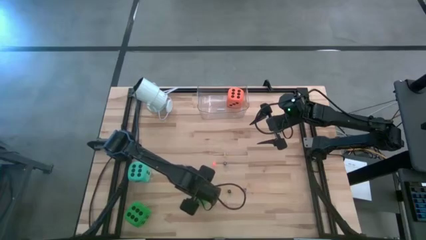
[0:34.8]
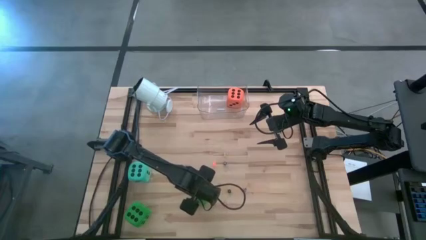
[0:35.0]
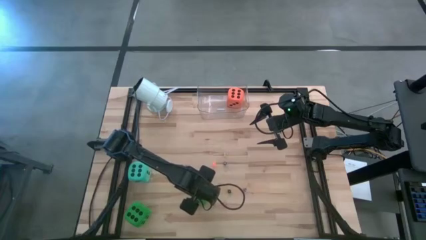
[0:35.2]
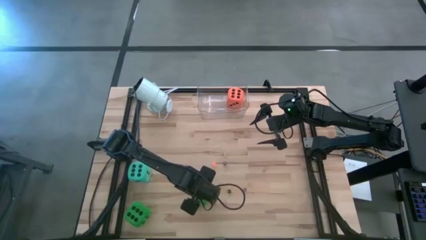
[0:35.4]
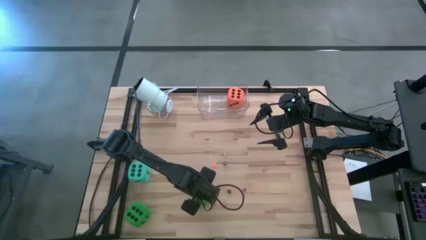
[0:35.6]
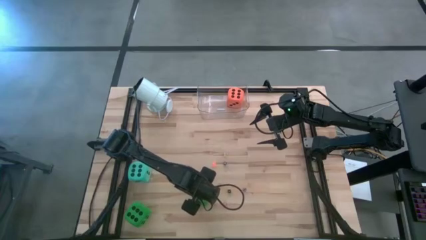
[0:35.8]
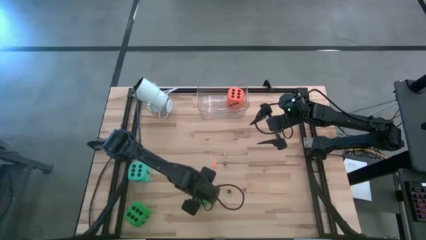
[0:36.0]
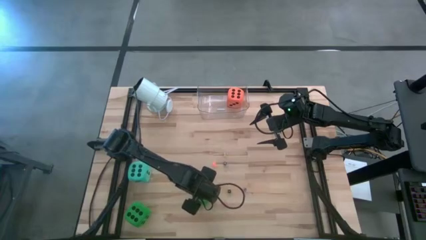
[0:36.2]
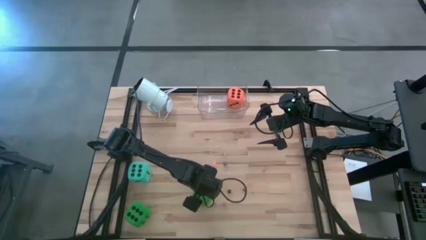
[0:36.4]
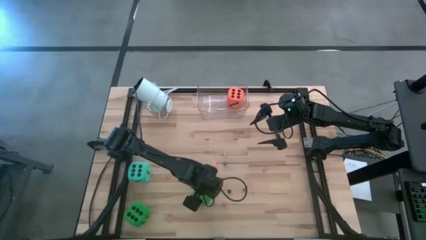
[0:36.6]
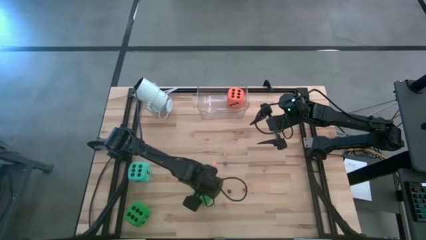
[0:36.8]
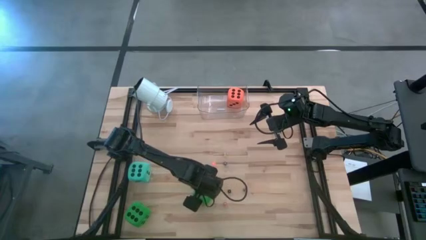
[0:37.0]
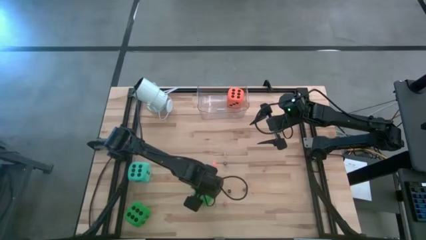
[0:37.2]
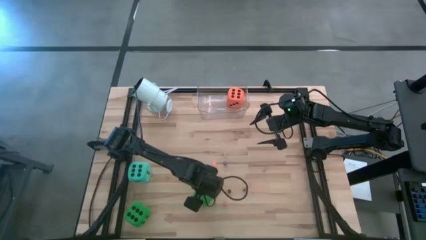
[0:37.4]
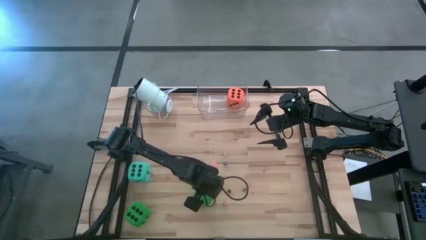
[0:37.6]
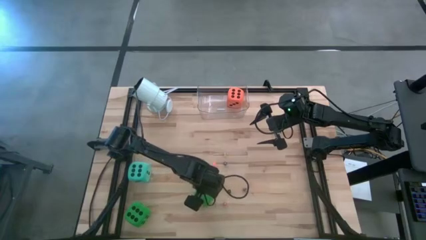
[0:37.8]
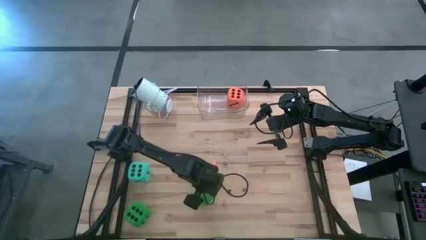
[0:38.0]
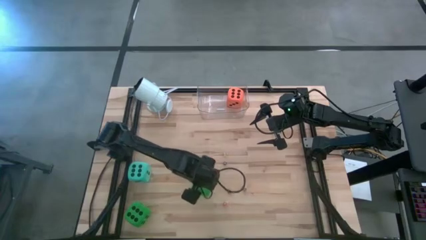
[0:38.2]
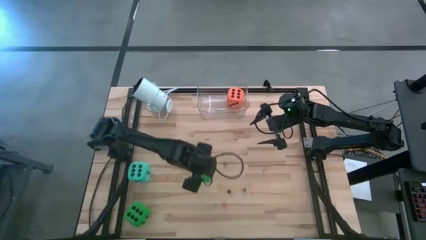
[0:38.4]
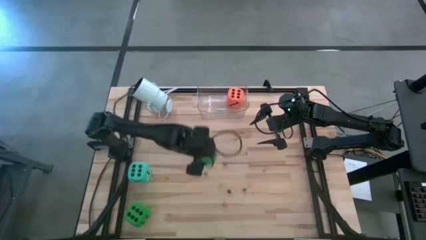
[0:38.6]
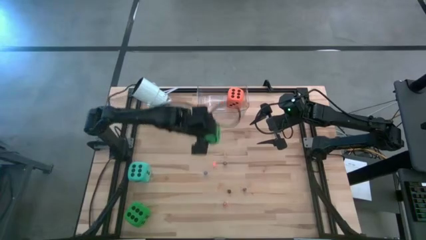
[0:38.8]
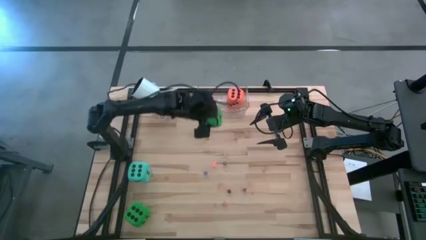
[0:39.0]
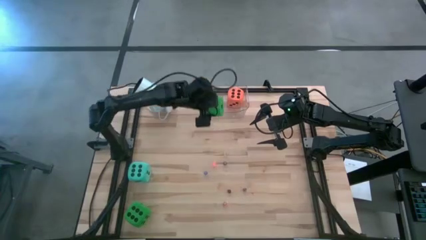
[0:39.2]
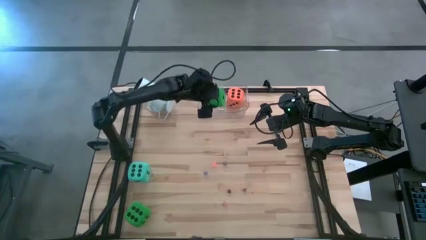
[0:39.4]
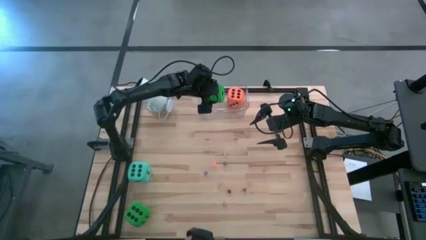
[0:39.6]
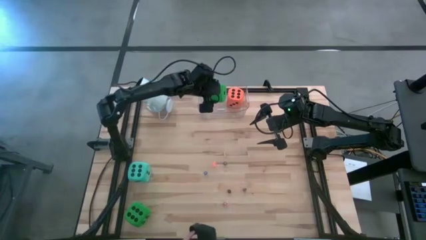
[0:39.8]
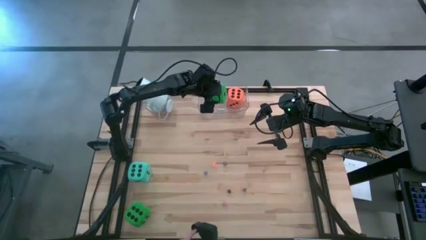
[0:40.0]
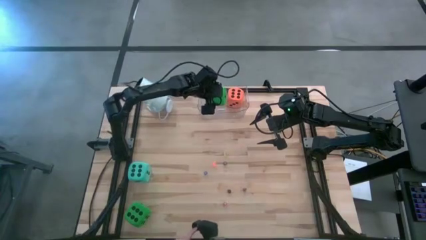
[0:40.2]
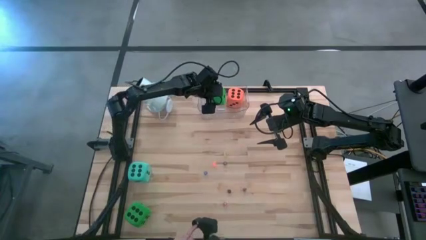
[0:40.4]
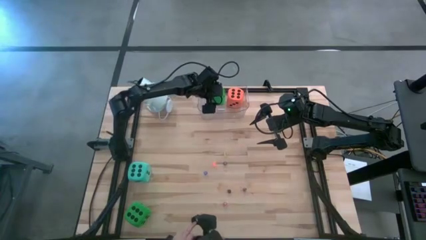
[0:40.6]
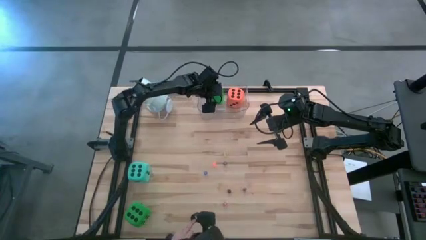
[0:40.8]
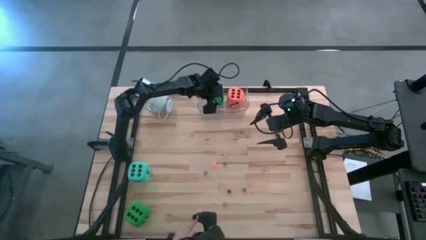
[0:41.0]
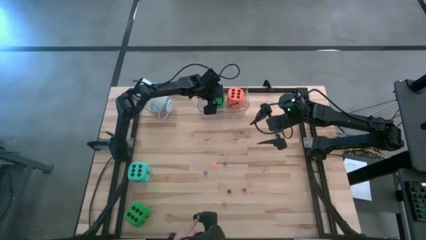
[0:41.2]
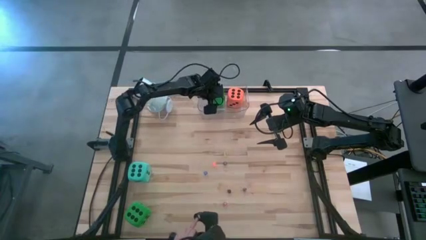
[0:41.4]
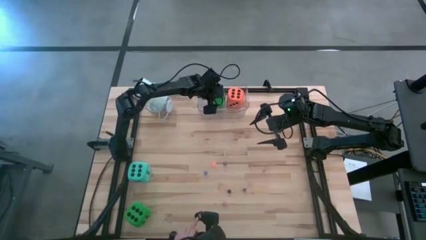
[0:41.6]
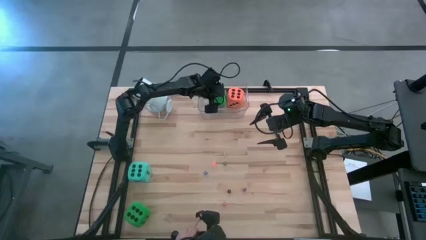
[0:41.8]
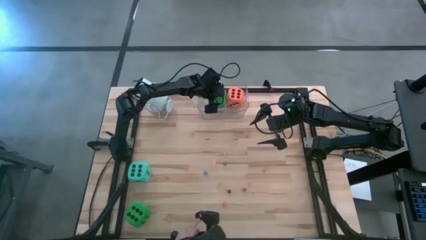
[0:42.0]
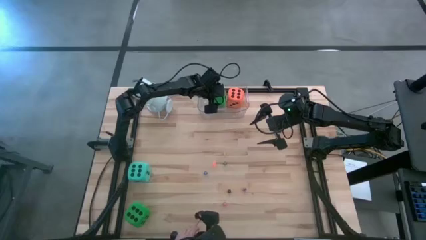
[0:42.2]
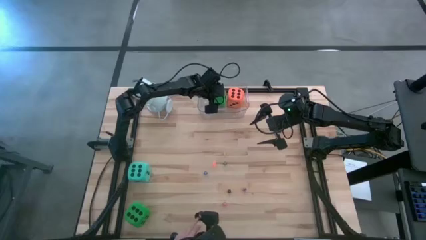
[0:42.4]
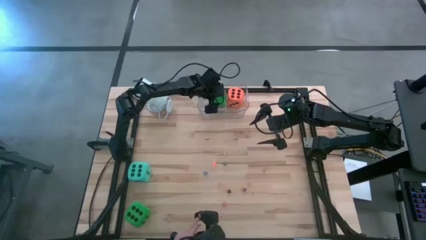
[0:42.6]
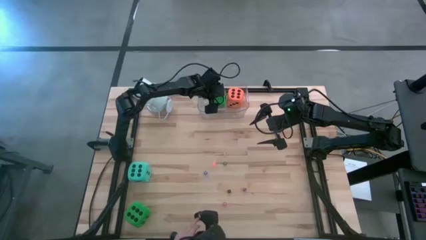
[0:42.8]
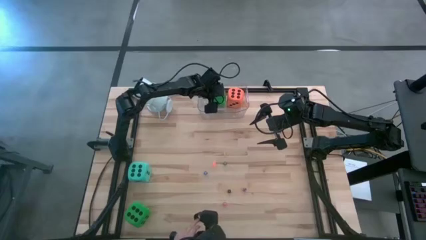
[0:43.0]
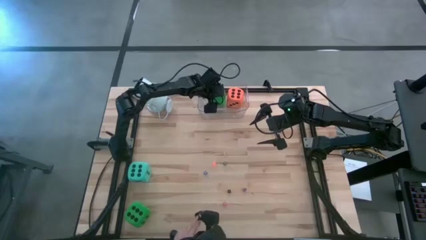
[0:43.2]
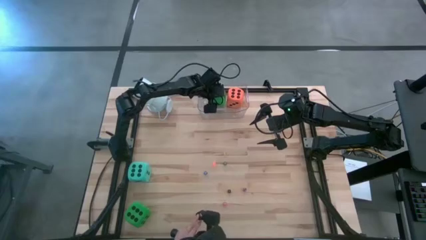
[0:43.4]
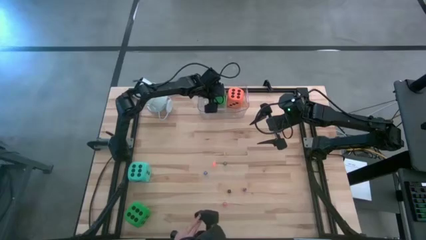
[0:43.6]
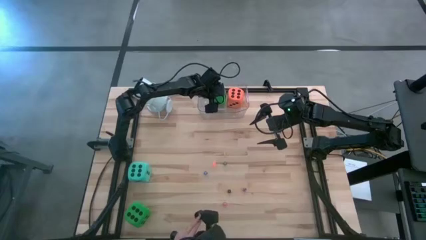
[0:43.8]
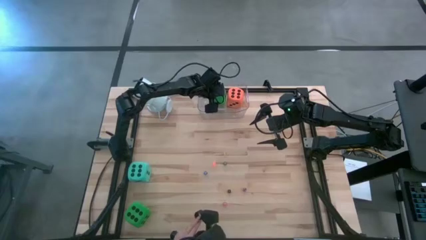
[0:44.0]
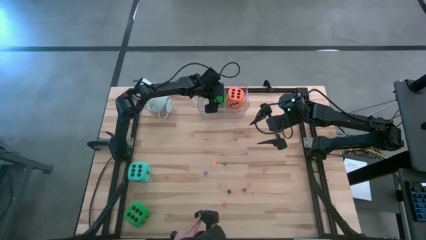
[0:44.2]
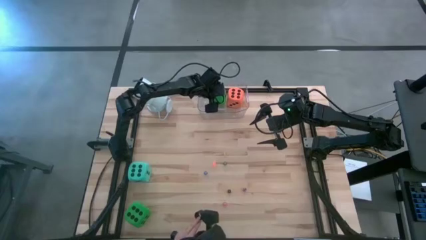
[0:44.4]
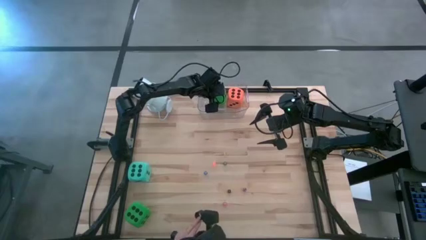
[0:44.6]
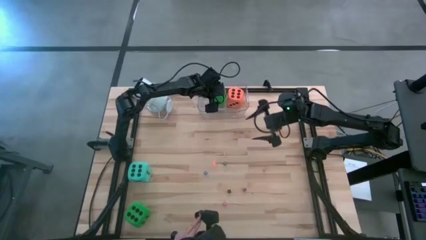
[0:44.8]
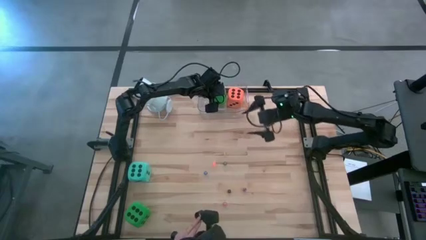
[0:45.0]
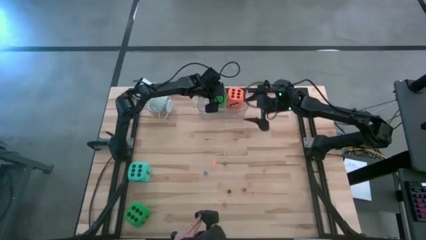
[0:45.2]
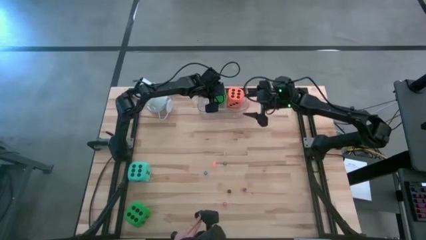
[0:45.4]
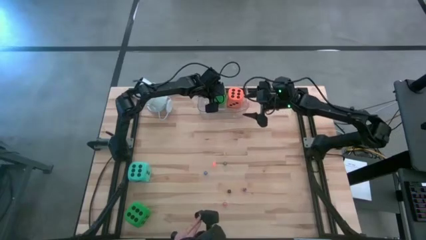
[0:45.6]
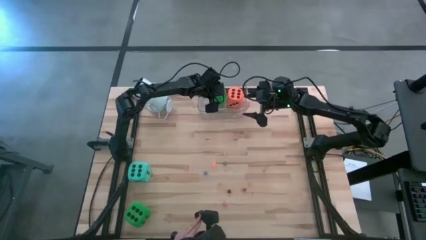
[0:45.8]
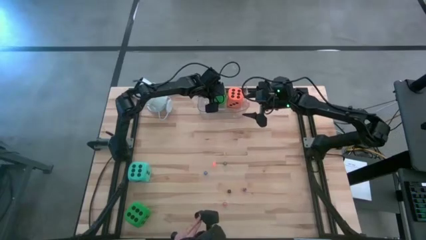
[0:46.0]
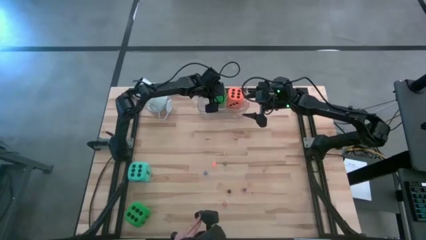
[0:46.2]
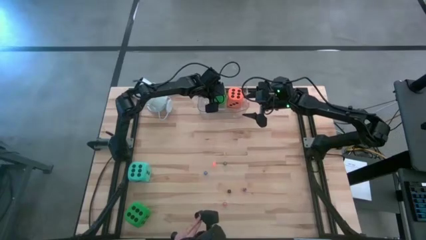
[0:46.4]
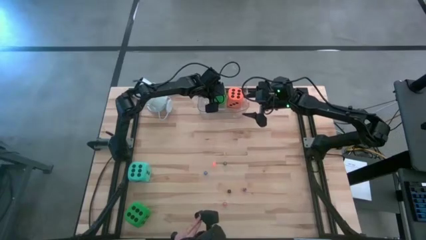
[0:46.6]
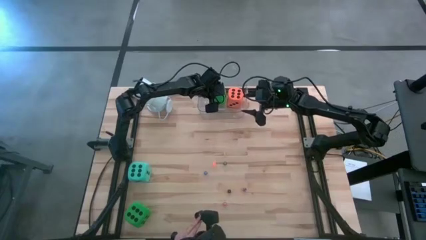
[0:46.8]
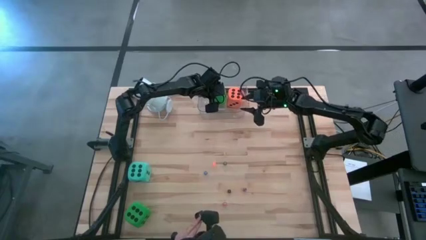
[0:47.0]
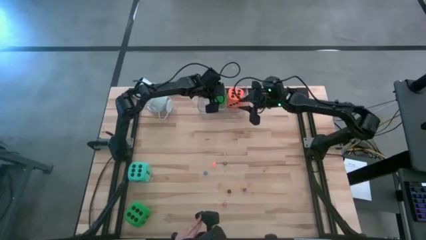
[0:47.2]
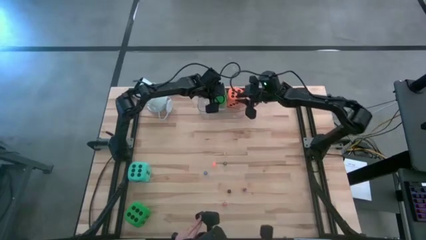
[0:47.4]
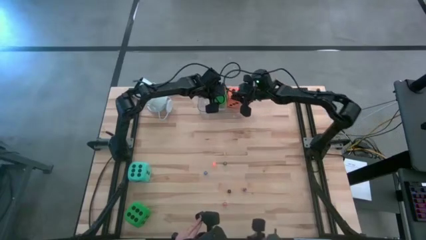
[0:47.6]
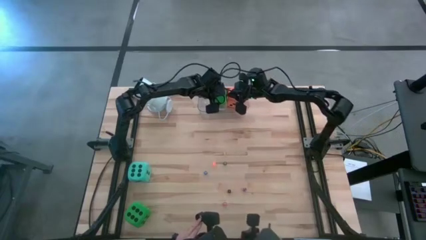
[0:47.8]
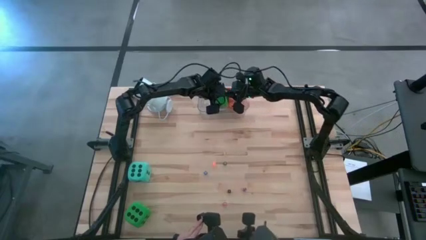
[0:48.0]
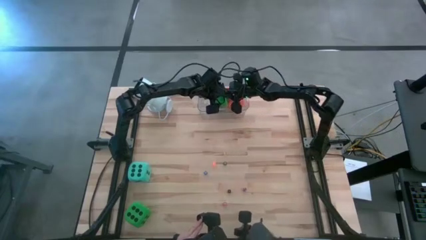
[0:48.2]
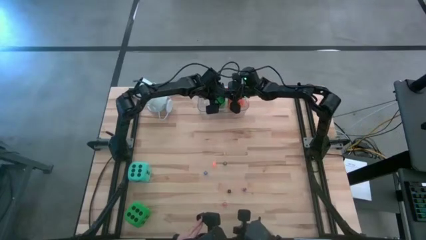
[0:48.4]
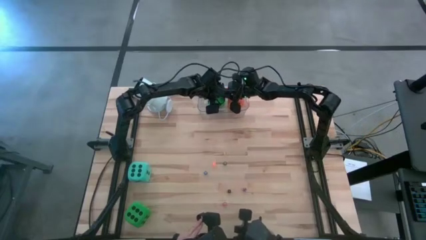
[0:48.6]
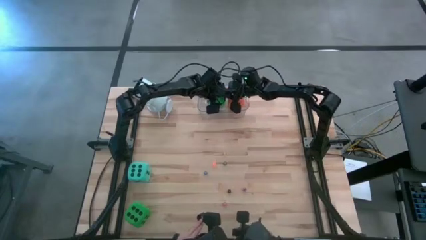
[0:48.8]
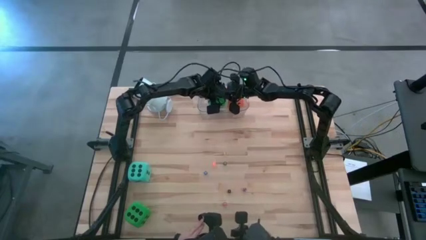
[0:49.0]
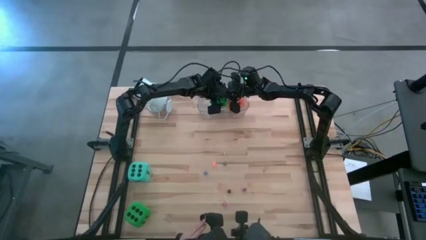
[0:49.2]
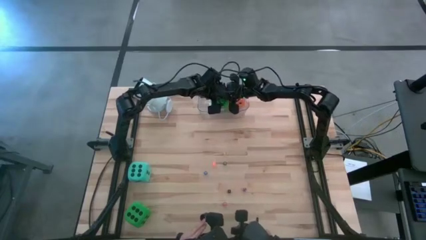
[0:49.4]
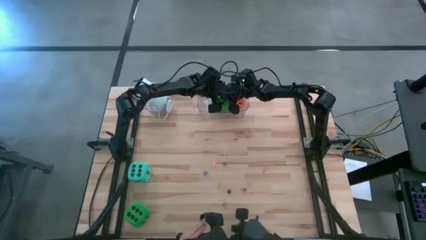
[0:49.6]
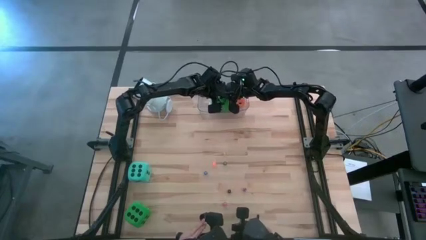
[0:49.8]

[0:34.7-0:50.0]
Task: Pick & Place Dice
Put the top big green dice into the transparent bin
